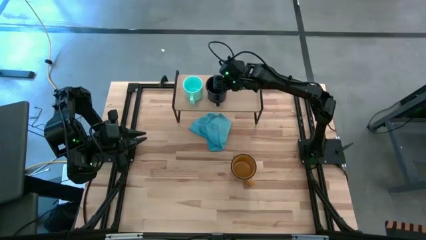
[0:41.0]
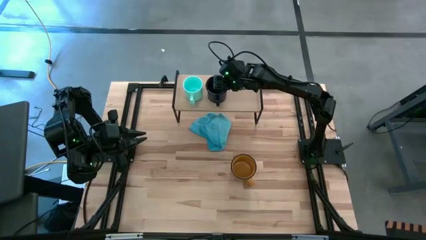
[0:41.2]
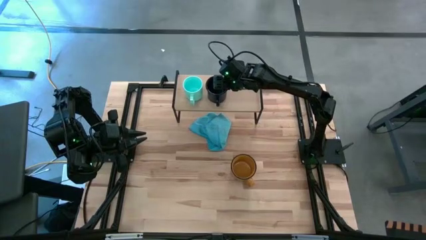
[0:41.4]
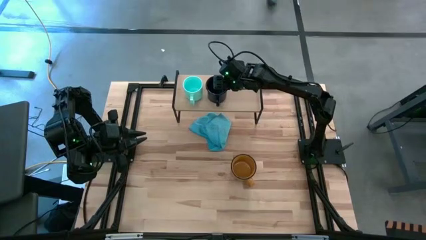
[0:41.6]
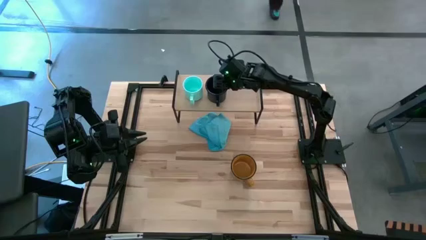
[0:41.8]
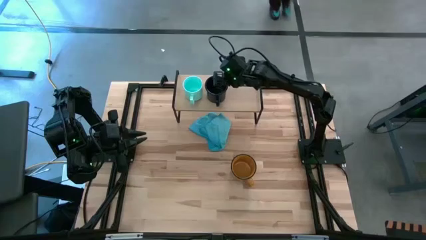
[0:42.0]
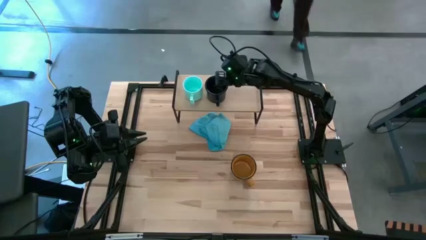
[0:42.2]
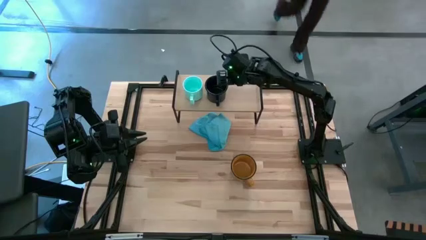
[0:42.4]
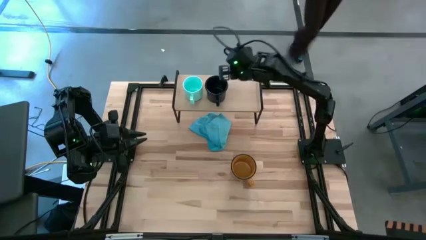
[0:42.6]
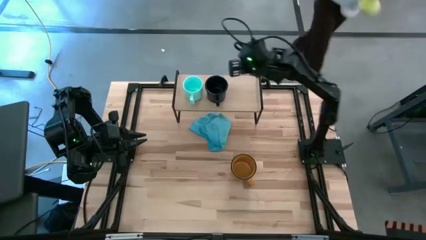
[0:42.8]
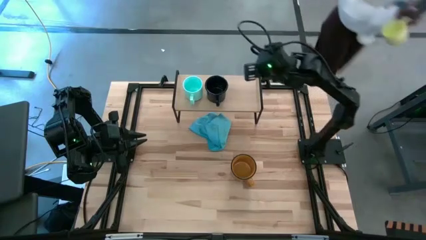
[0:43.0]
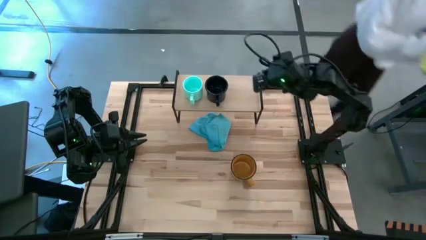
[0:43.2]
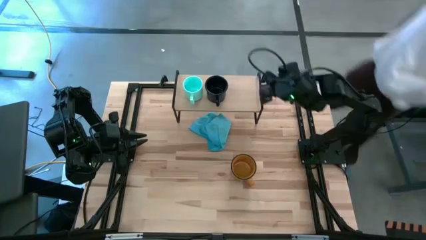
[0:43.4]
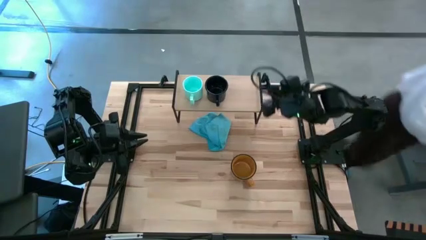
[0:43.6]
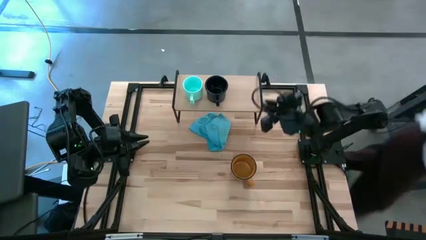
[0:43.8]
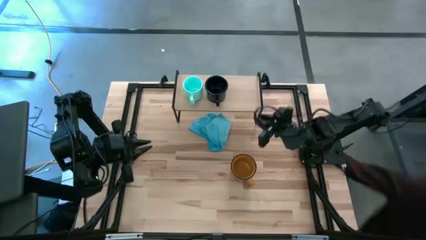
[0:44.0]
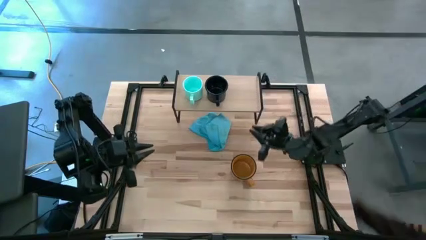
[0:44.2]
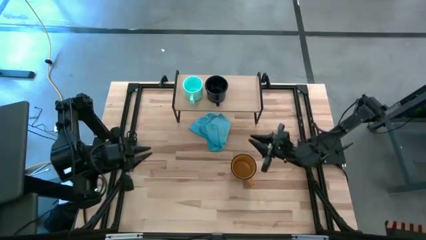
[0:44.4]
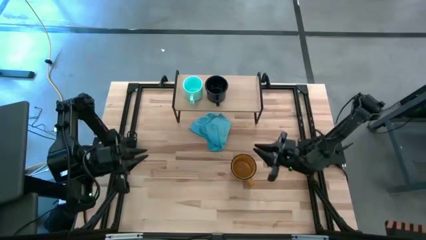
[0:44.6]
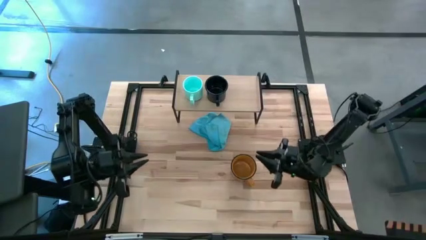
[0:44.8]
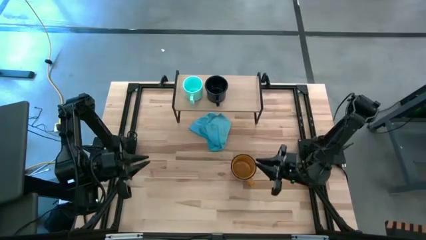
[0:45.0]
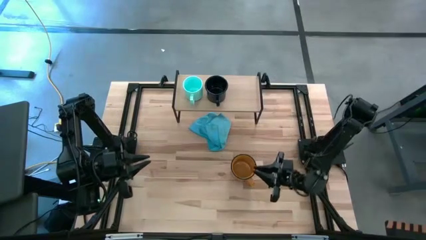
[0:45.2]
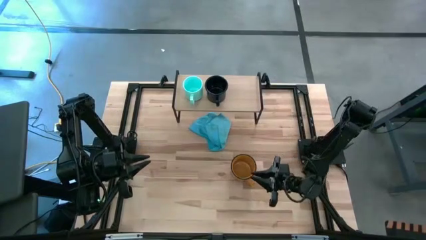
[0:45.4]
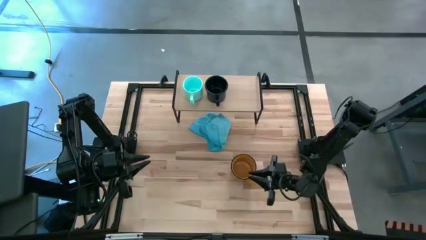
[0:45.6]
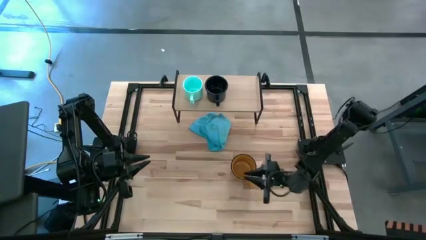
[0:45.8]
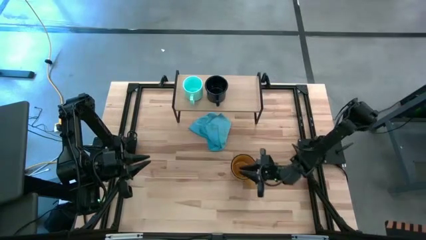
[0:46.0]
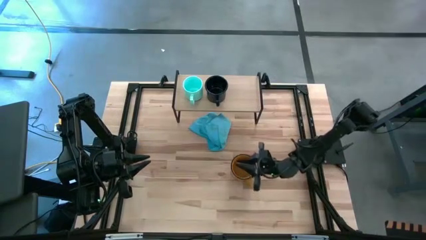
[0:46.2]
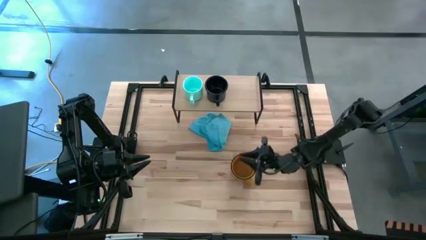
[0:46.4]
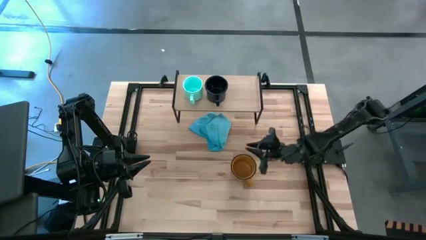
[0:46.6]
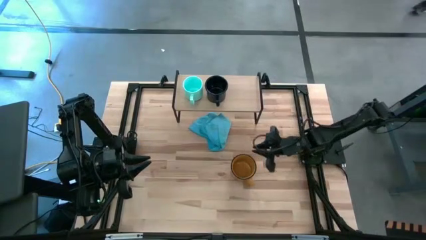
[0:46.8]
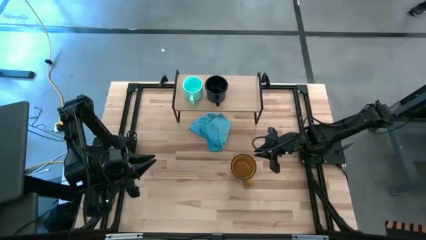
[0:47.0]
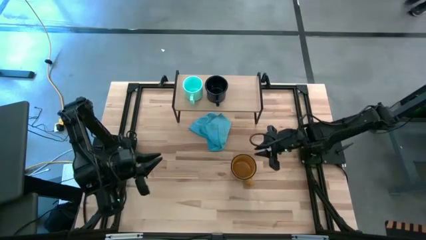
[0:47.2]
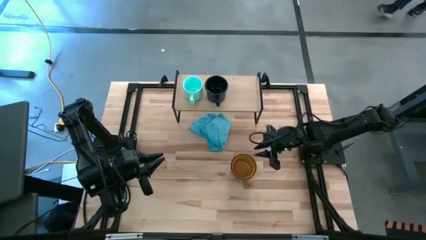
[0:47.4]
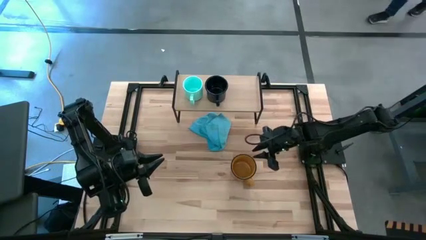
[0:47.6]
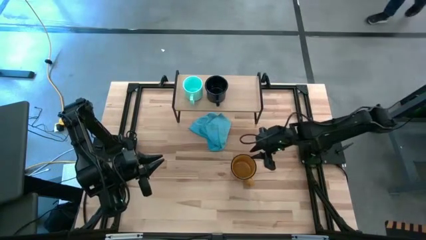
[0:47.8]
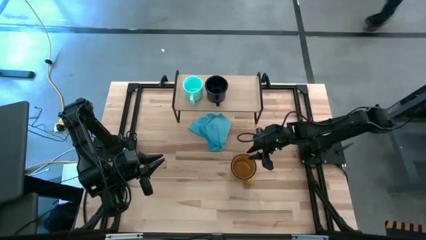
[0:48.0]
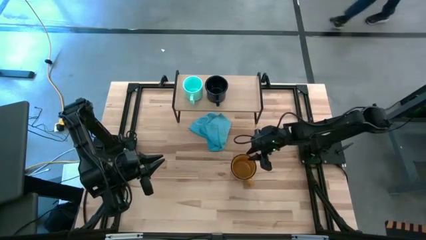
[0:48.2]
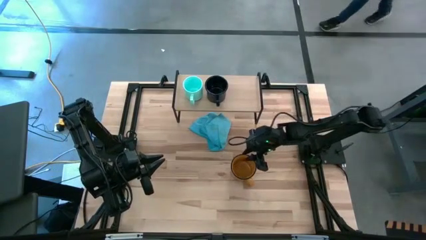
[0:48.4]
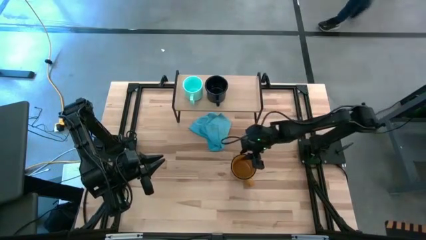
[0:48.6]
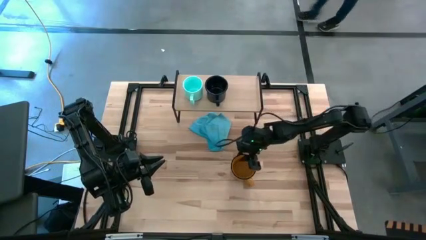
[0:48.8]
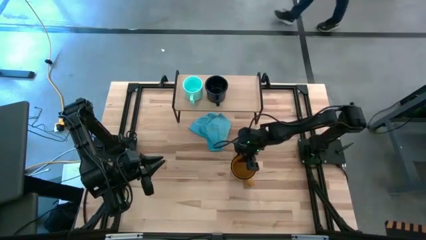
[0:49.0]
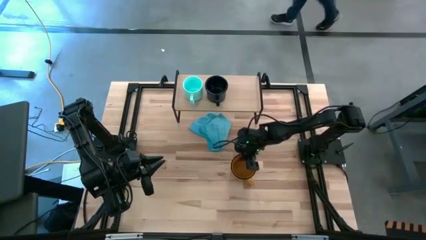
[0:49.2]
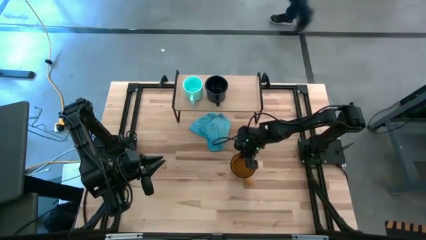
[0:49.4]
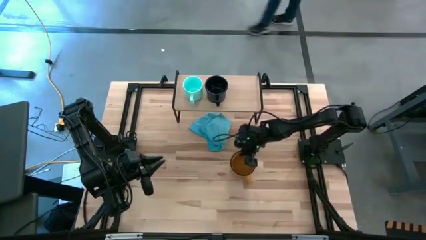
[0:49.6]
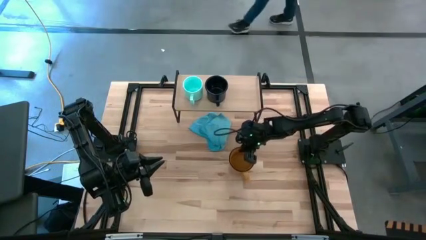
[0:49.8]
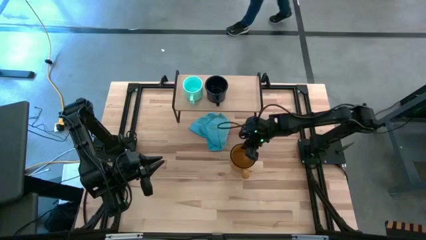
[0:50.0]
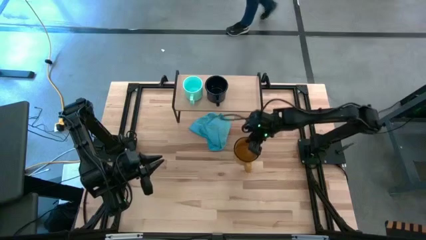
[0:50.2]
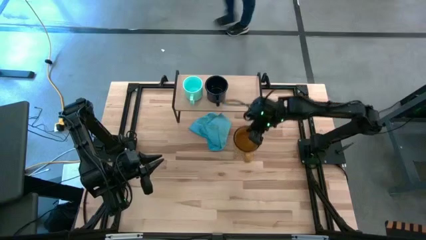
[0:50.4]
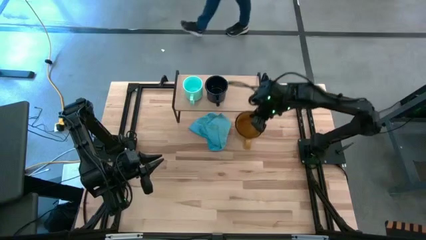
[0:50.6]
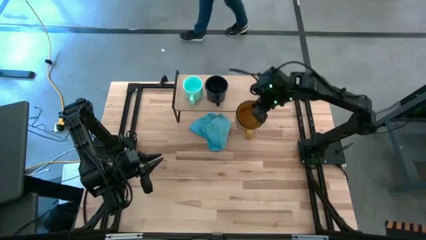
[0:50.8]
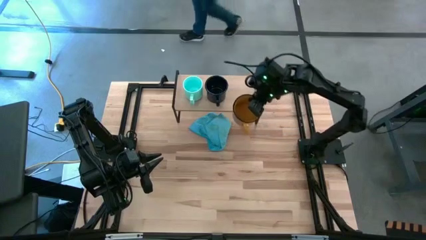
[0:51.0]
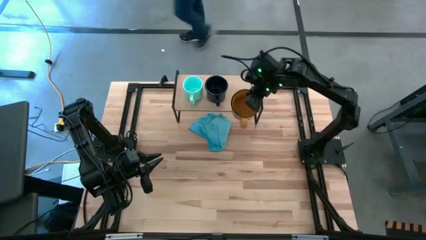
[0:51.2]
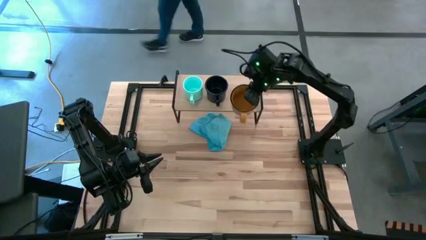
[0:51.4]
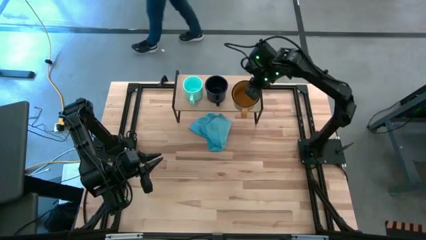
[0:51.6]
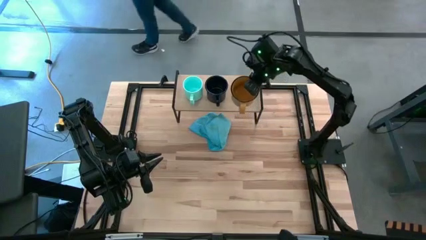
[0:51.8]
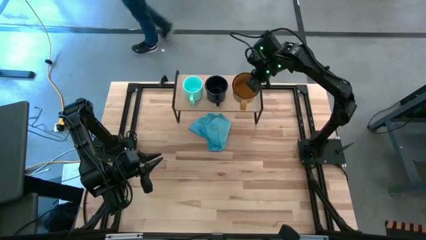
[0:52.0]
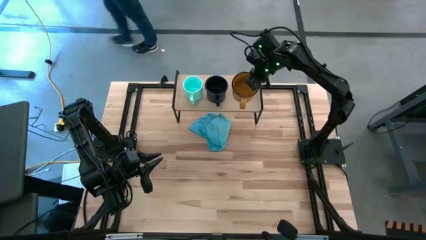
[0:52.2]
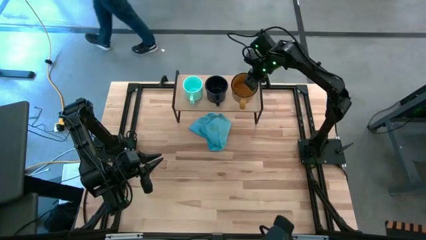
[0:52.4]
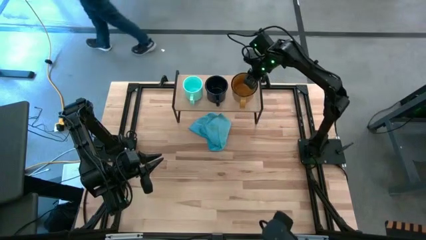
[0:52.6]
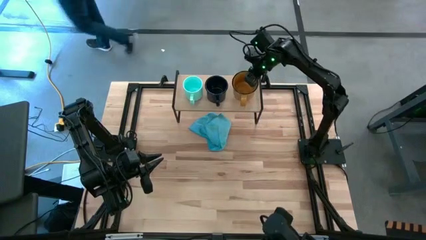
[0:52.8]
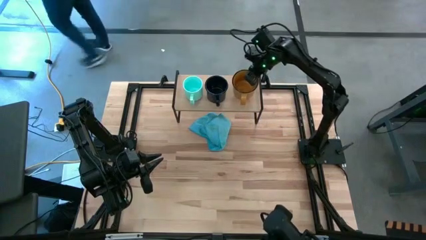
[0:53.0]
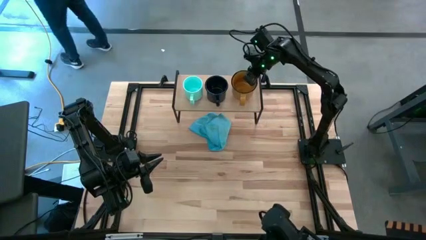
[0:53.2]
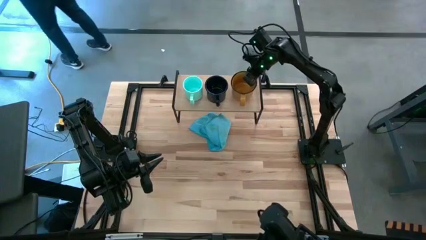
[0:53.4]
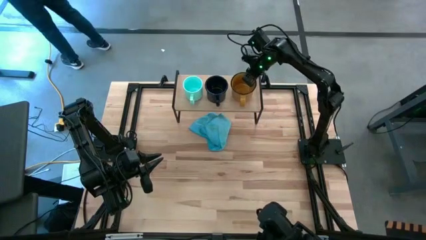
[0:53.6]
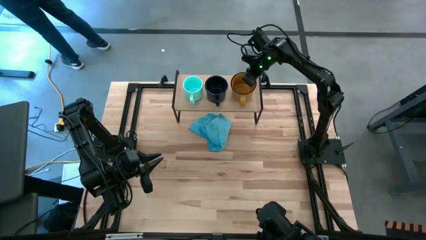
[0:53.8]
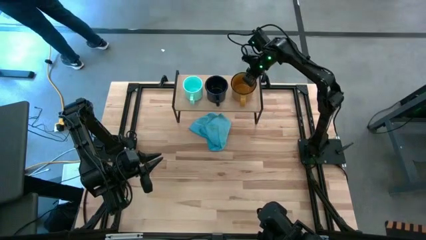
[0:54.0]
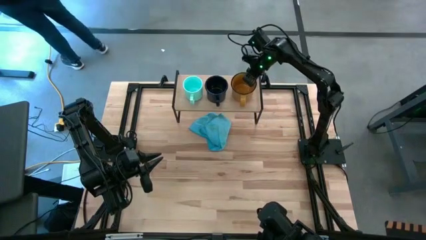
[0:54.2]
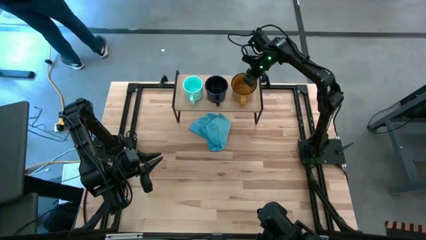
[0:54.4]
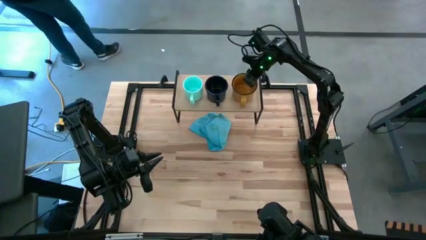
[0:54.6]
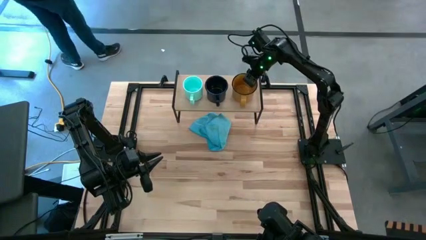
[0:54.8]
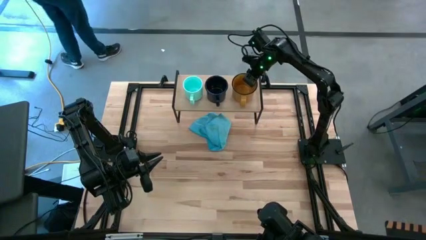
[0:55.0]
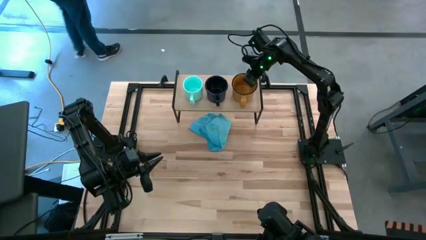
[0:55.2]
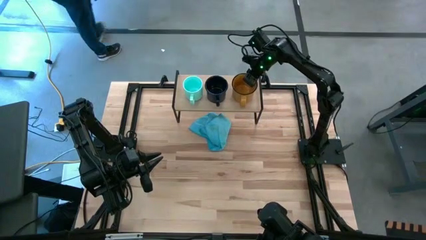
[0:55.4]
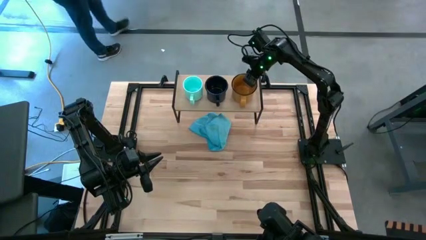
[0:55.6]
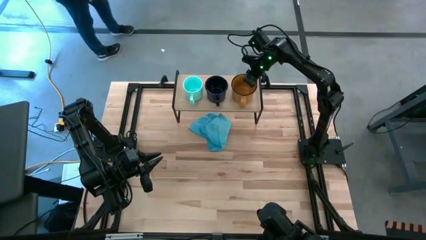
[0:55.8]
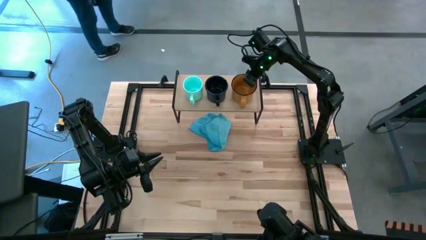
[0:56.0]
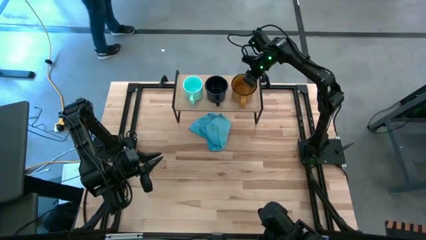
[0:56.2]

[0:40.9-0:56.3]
Task: Stack small to large cups/mugs on shelf
Put the brown cup on the shelf

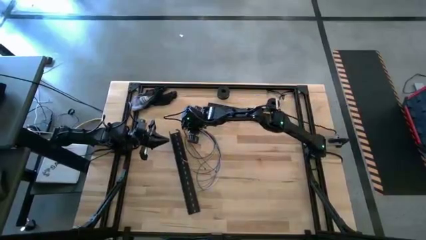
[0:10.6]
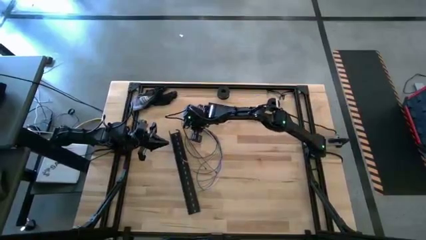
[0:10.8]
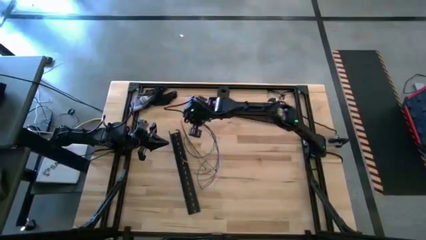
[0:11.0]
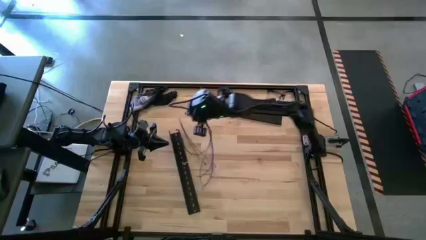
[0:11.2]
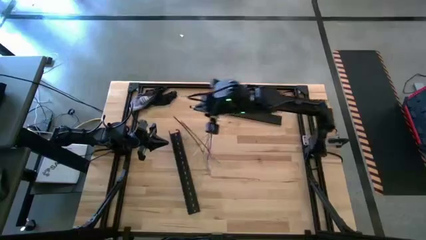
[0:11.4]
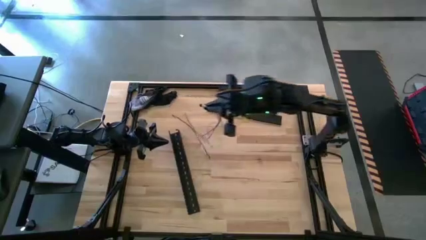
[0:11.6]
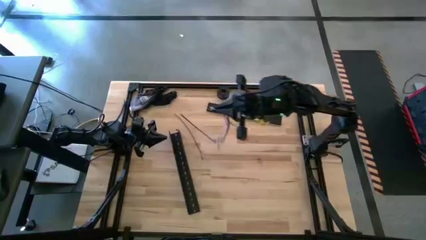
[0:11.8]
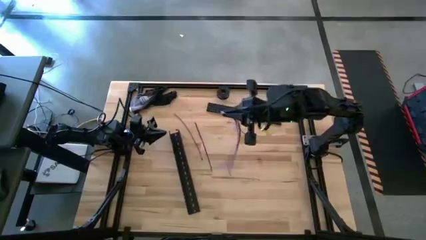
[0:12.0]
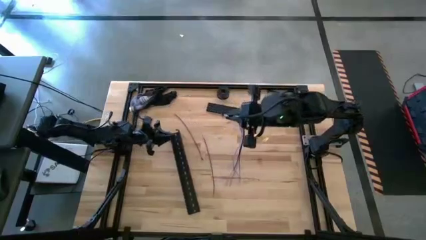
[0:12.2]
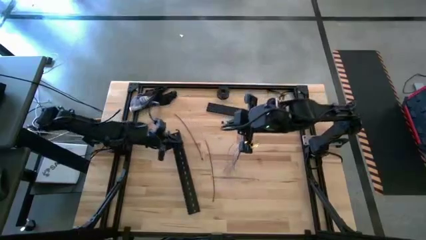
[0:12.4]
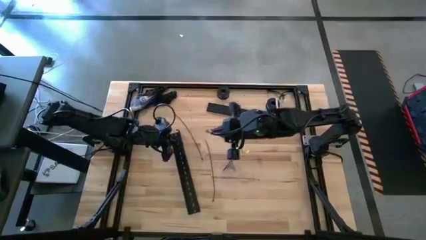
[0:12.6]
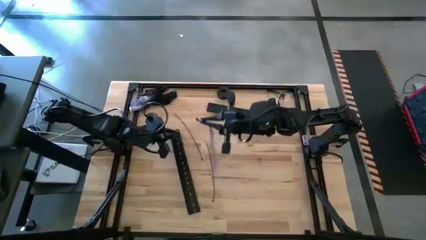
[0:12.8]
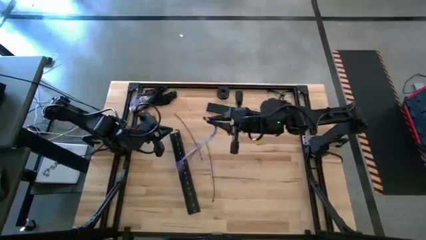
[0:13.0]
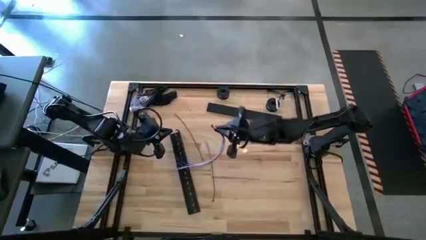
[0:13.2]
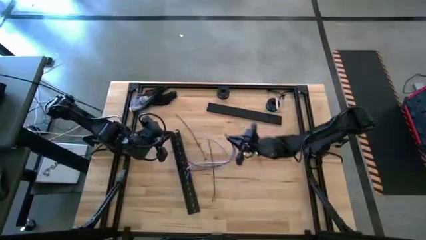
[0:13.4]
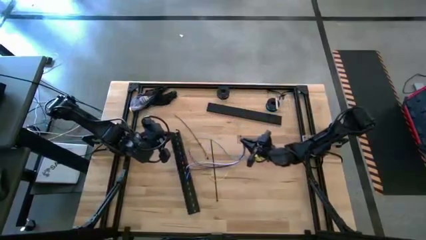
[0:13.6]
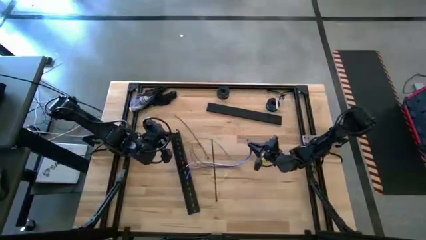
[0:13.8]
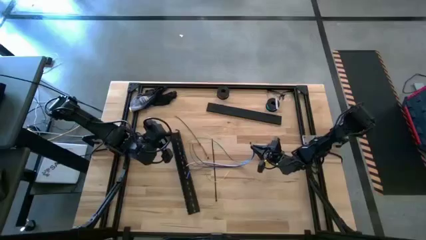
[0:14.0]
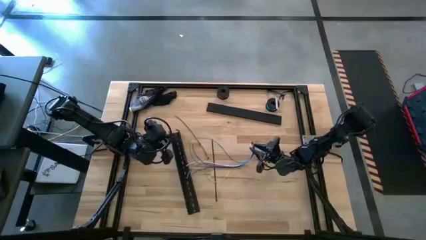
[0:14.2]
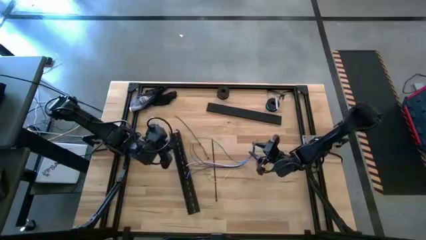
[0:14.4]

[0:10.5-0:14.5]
Task: Ziptie cables
Move the cable wires to the center of the table
